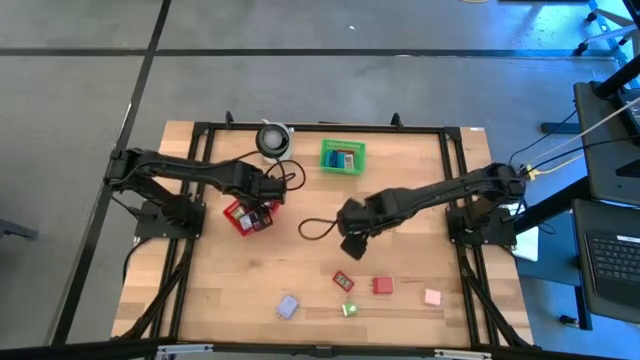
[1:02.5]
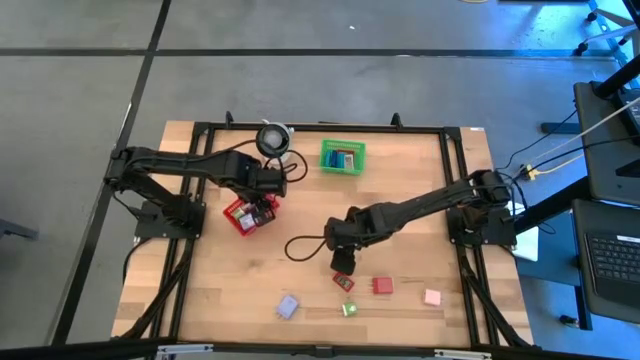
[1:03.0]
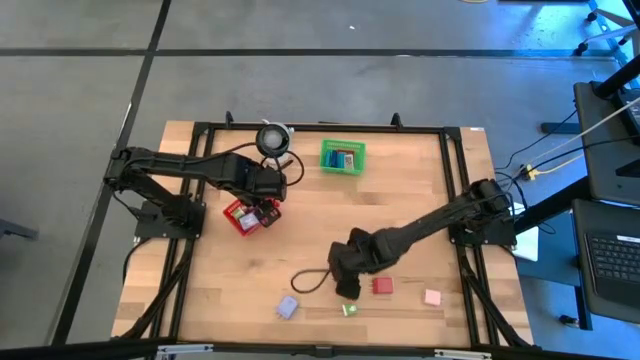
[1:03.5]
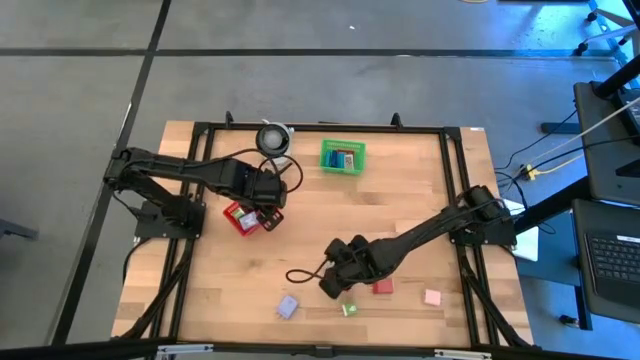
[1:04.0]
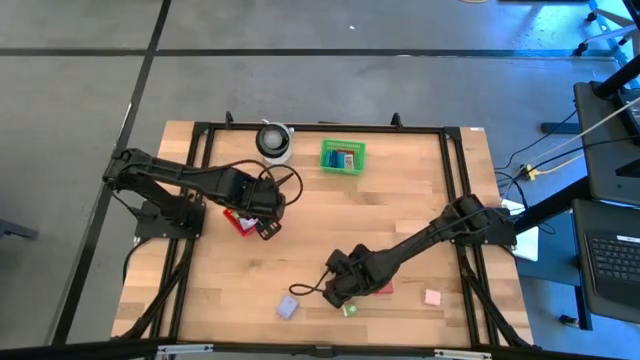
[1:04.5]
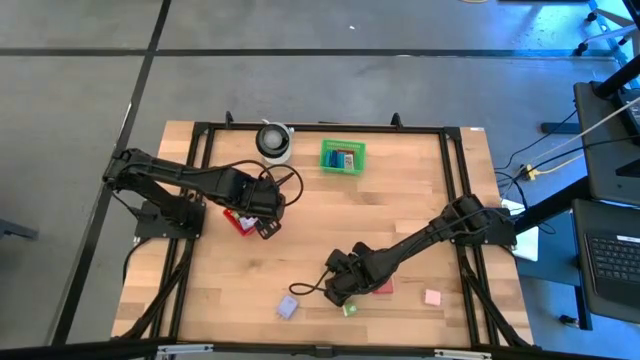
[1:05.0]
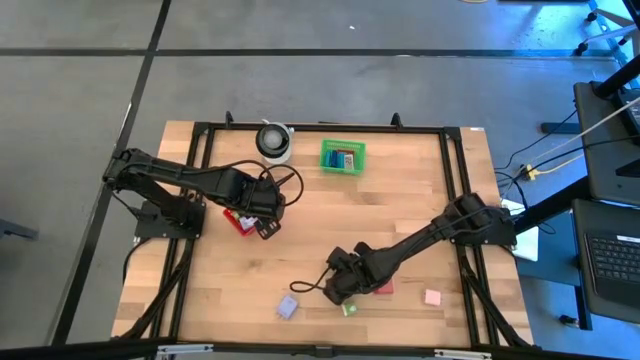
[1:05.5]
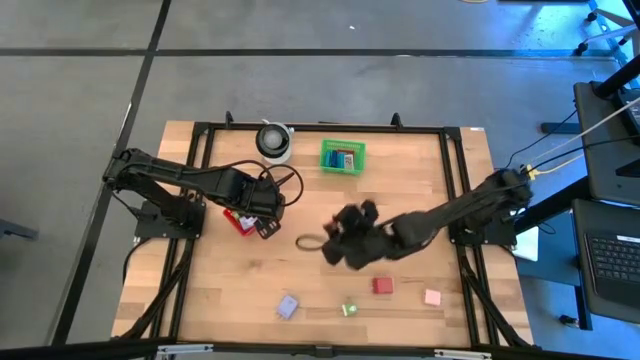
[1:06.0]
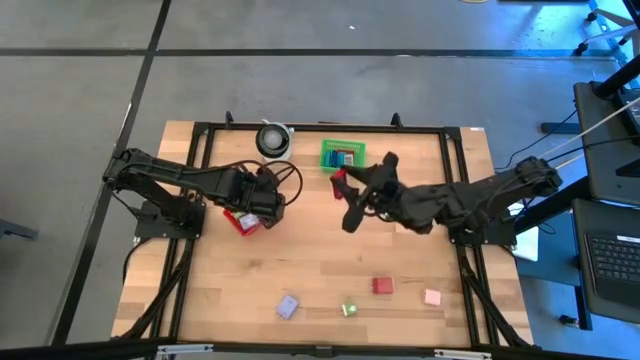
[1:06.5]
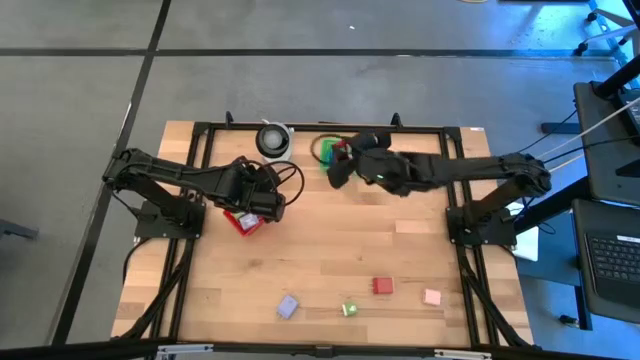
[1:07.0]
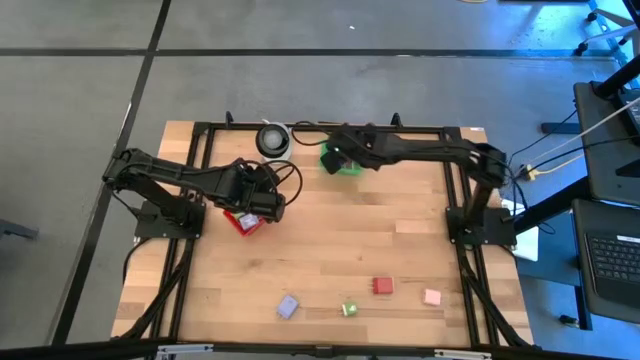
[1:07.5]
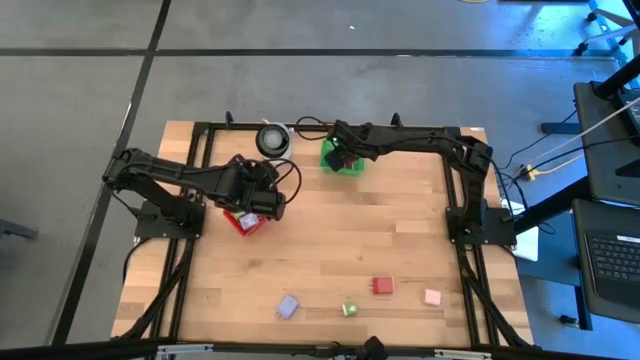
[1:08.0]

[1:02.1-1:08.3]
Task: Pick & Place Office items
Put the red digital clock into the green bin

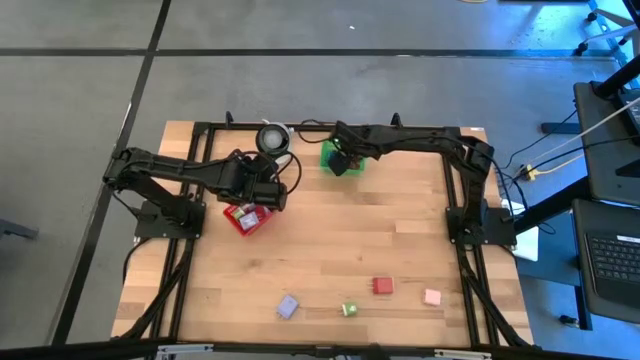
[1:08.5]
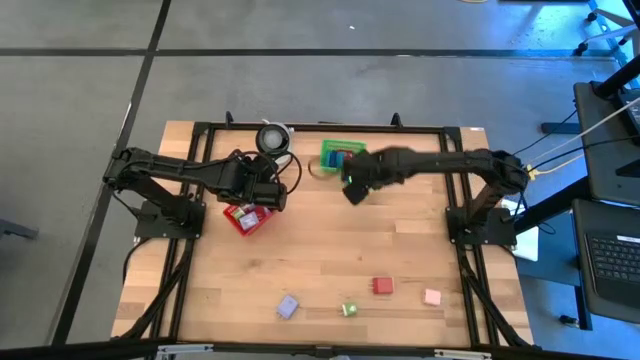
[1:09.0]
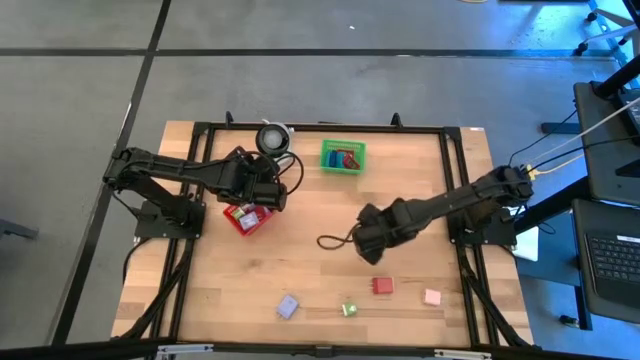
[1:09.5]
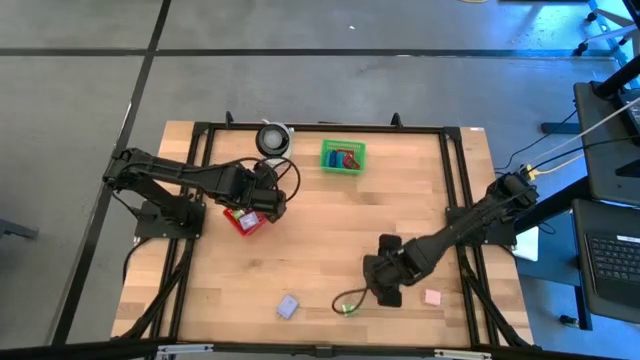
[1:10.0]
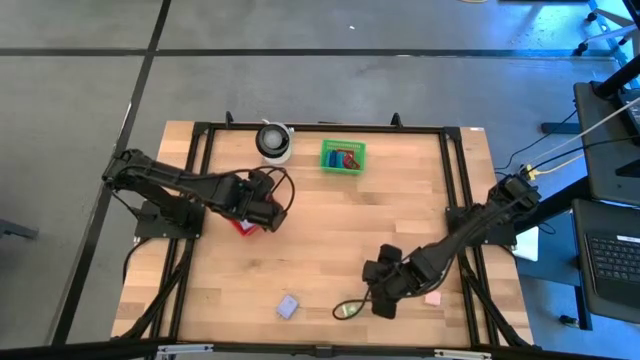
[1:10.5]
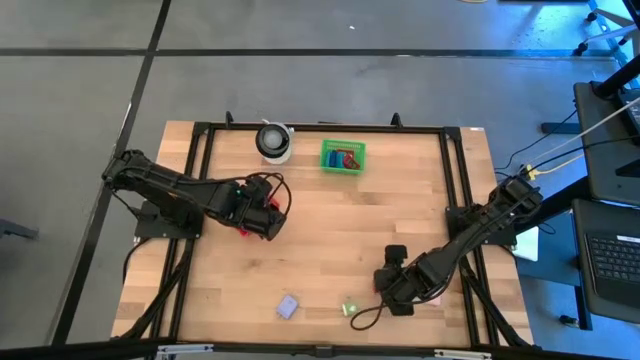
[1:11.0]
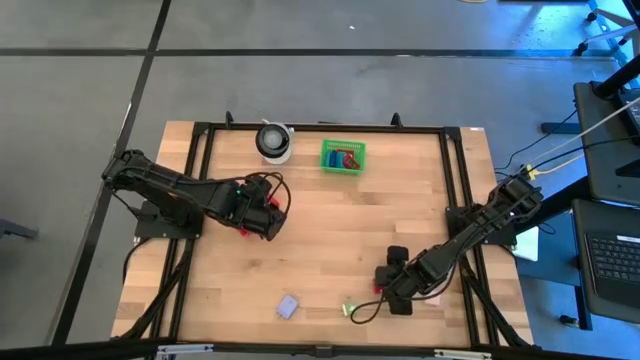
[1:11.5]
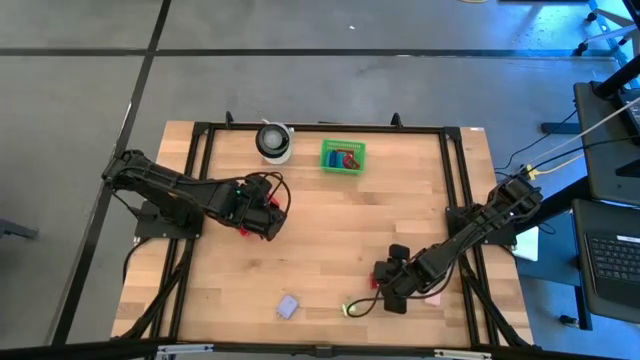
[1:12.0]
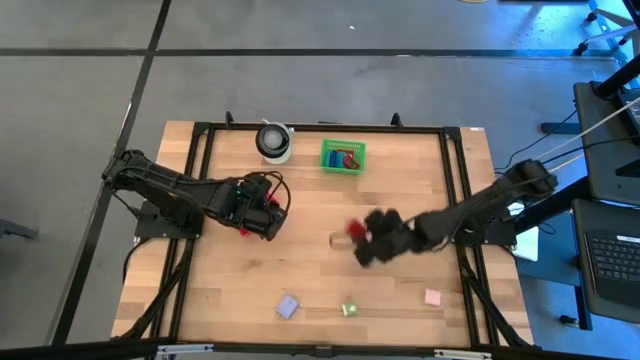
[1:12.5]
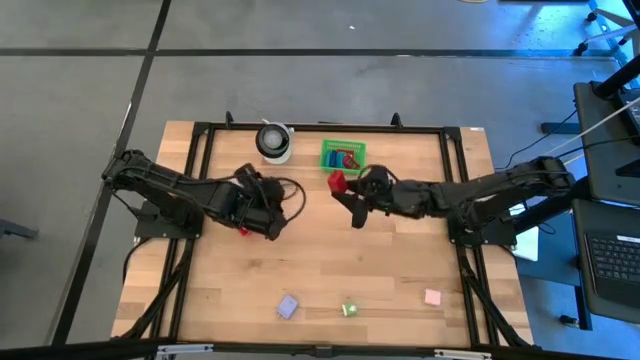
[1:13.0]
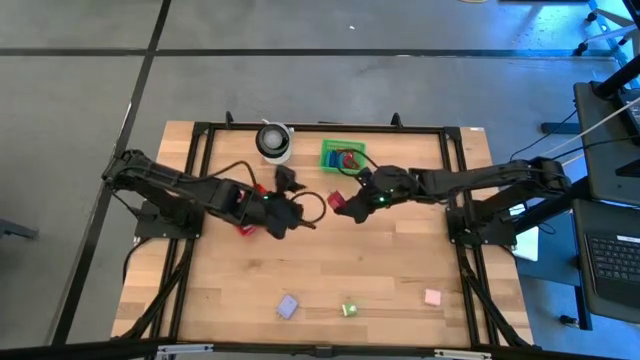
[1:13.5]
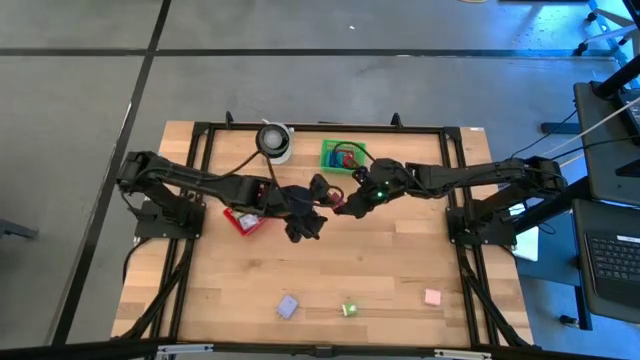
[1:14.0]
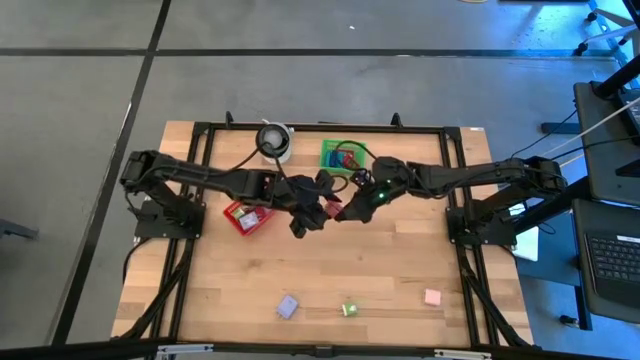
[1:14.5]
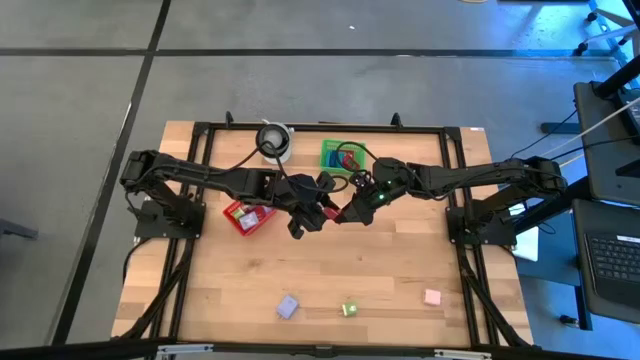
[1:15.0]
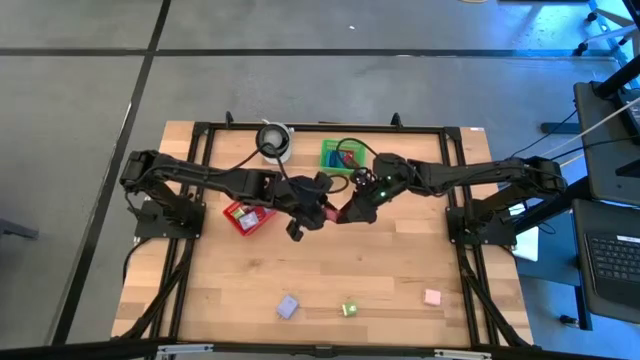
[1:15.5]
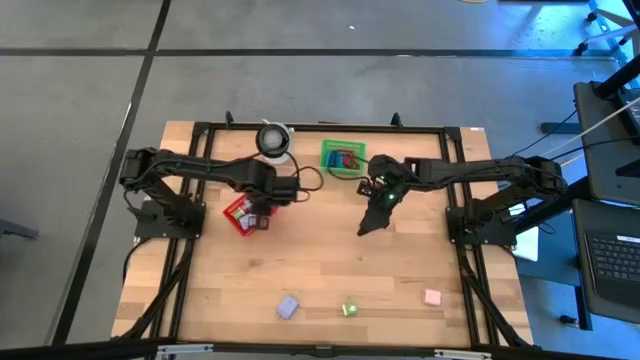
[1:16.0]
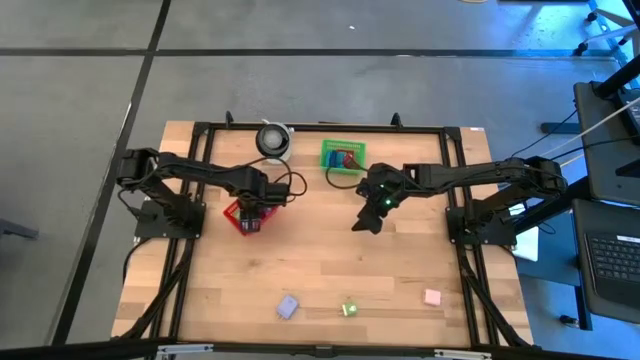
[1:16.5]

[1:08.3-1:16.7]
Put the red charger adapter into the red bin

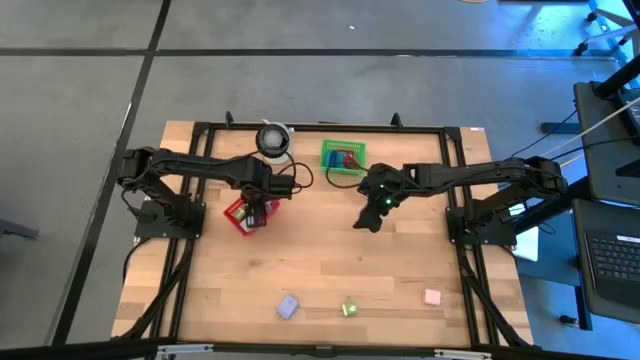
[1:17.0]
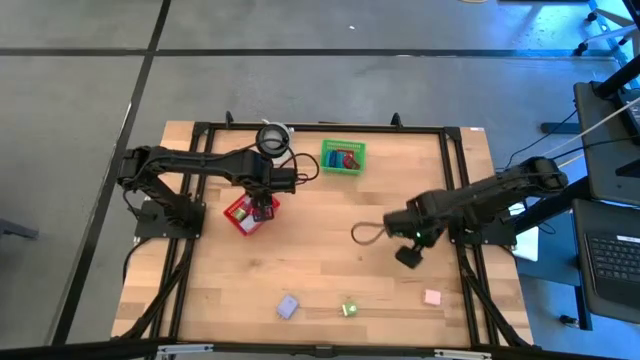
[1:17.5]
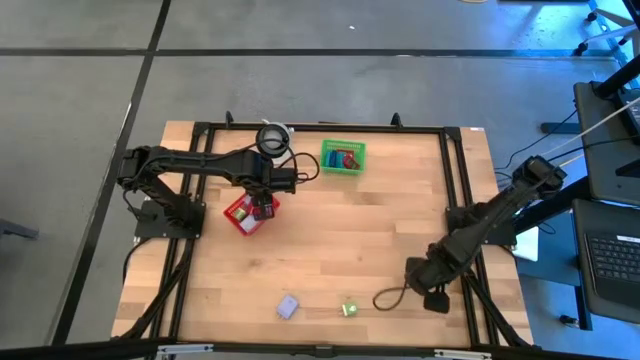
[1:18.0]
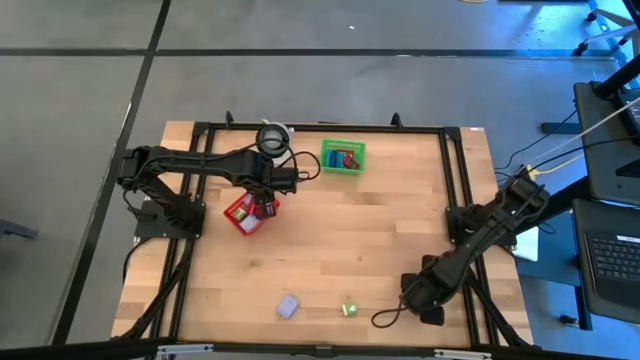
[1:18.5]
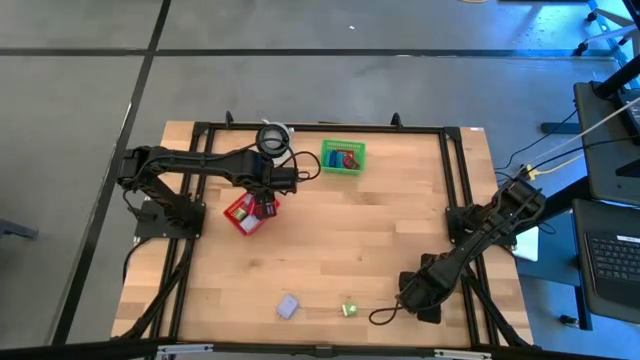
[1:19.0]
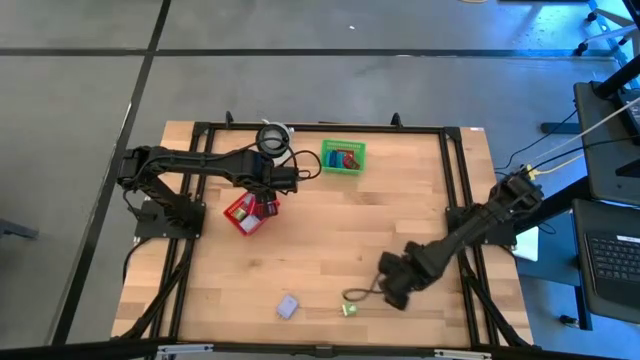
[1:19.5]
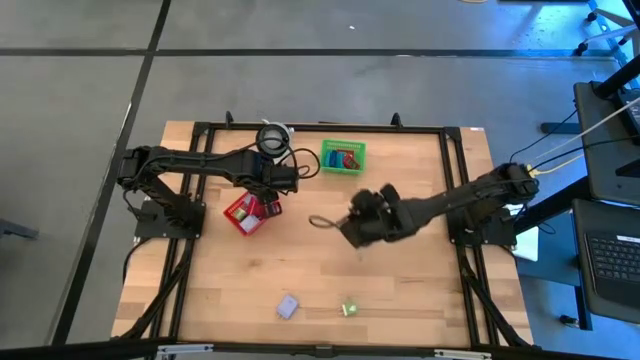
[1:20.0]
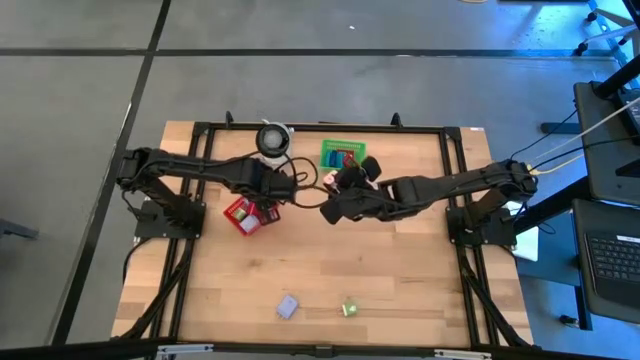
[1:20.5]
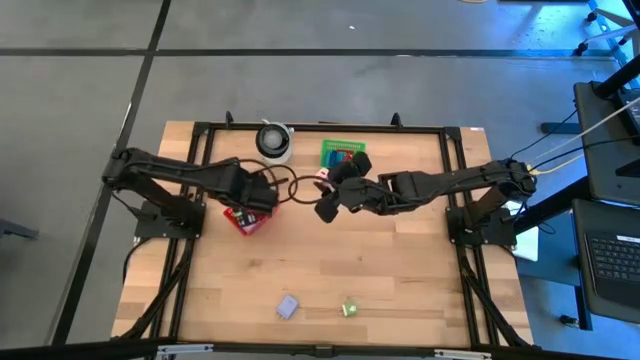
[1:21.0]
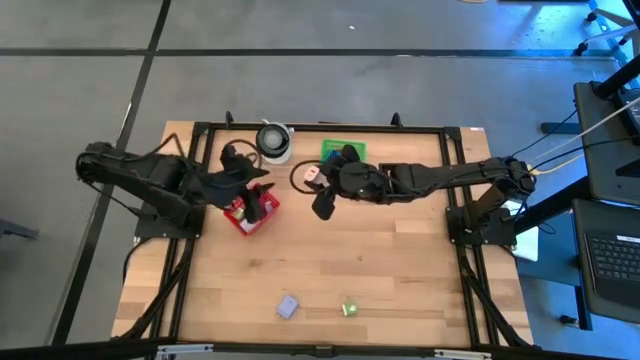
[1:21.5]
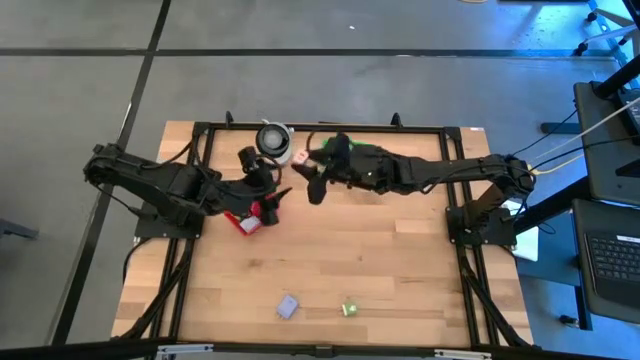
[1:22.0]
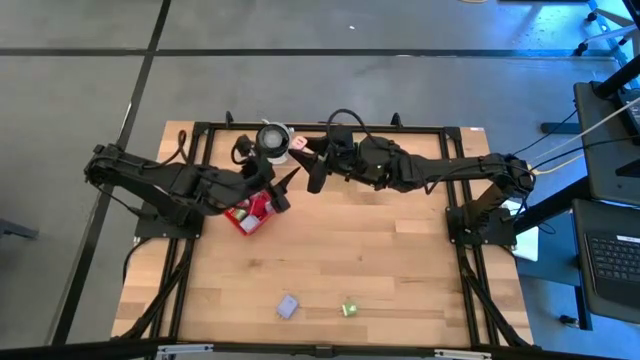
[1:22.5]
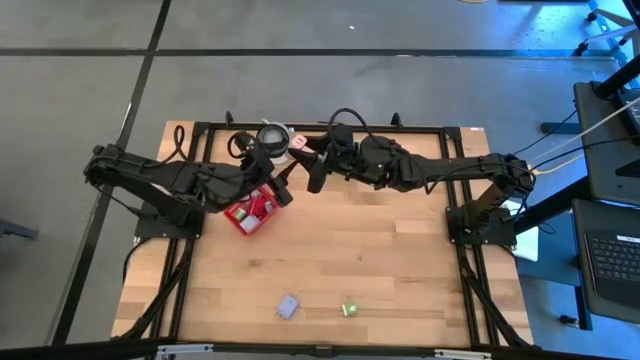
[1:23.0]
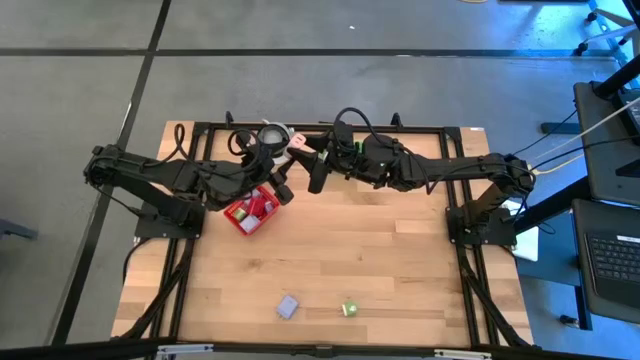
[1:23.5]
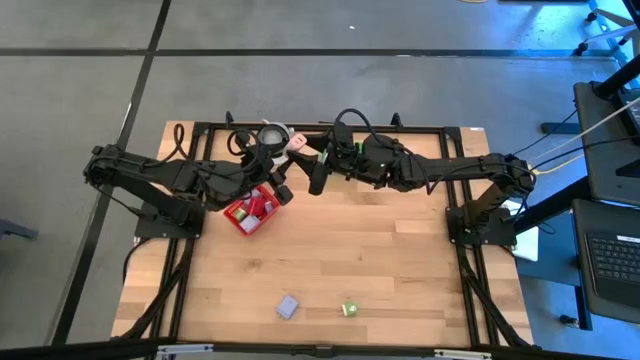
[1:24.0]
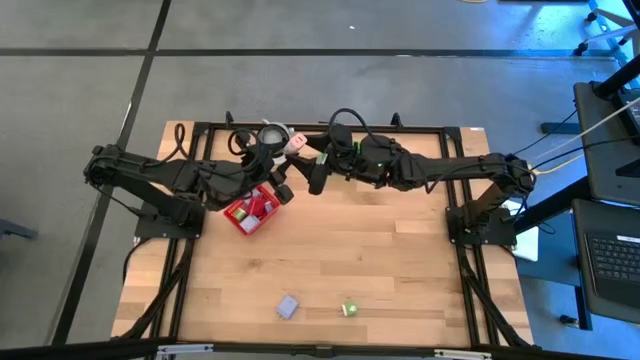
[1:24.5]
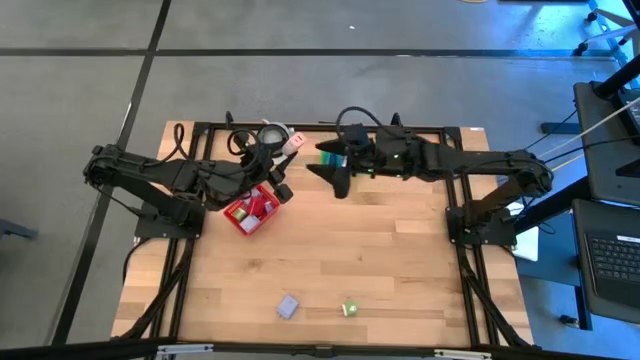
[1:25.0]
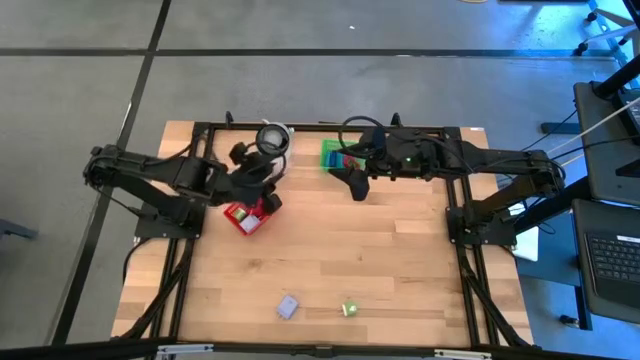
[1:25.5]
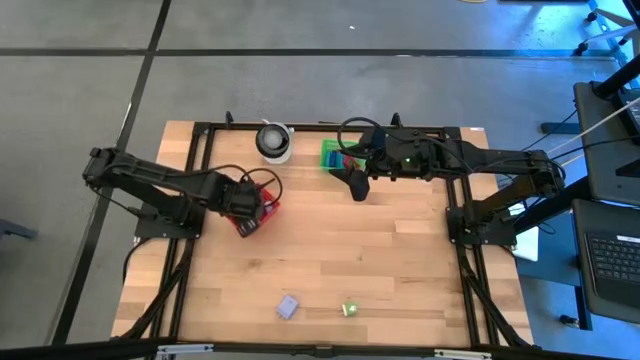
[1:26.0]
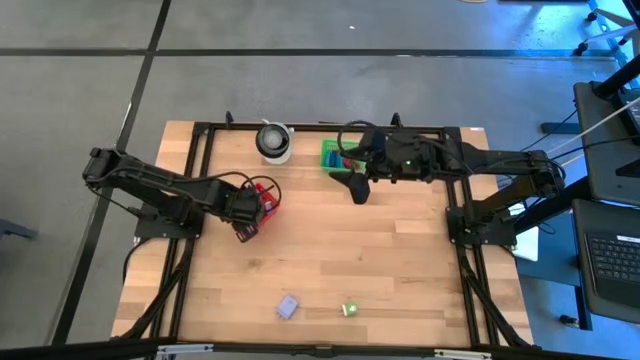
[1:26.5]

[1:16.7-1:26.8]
Put the light pink charger adapter into the red bin
